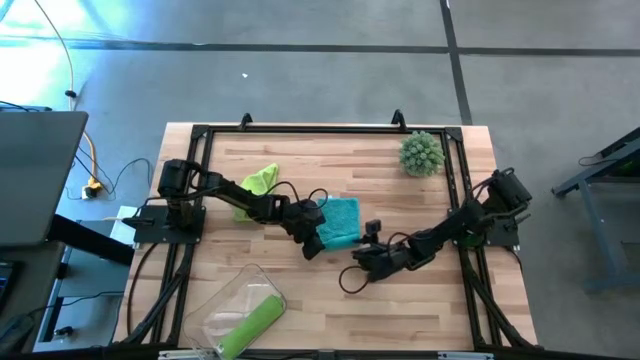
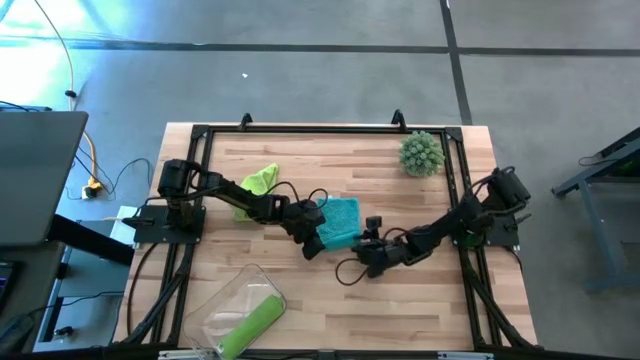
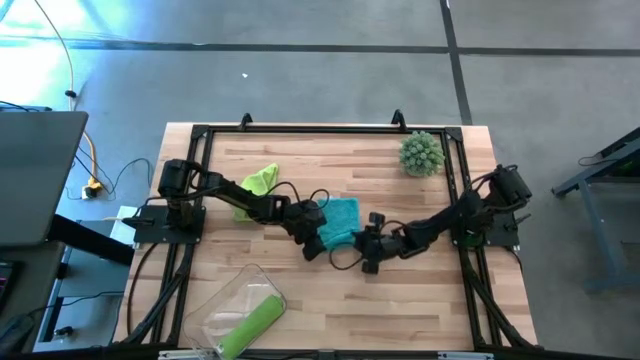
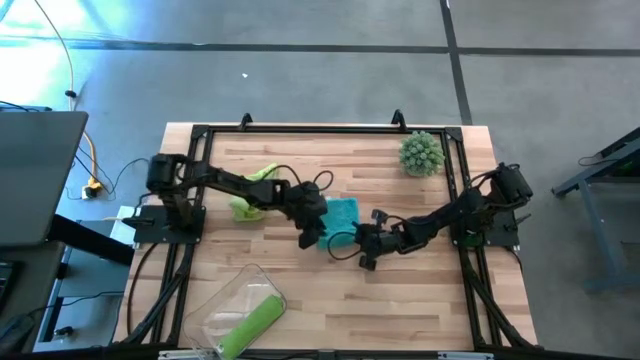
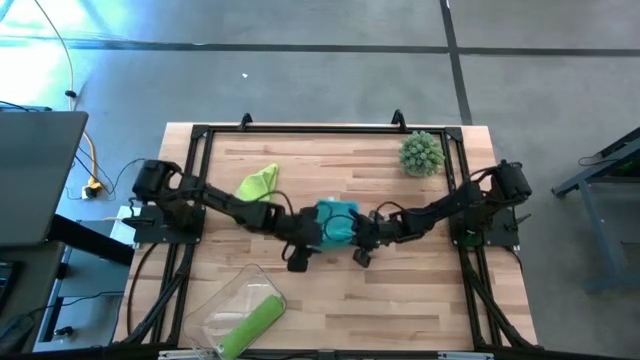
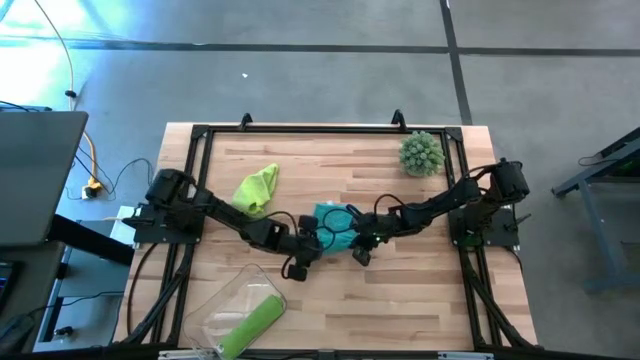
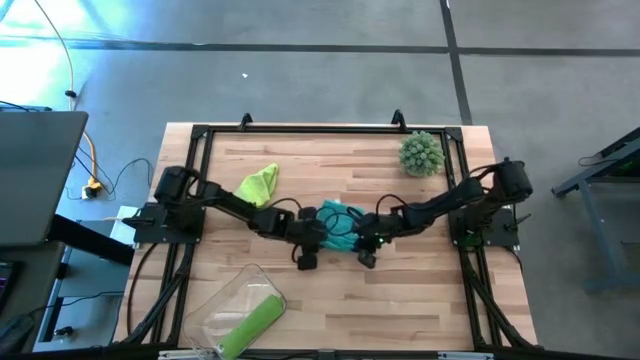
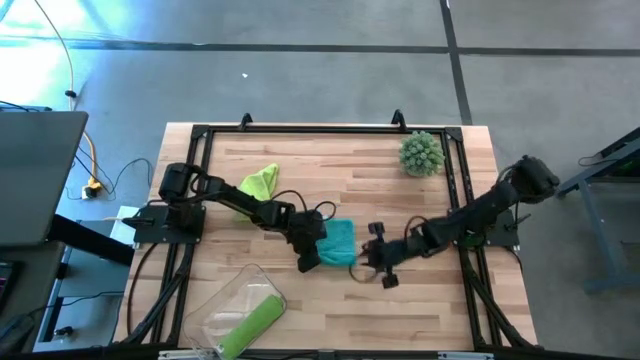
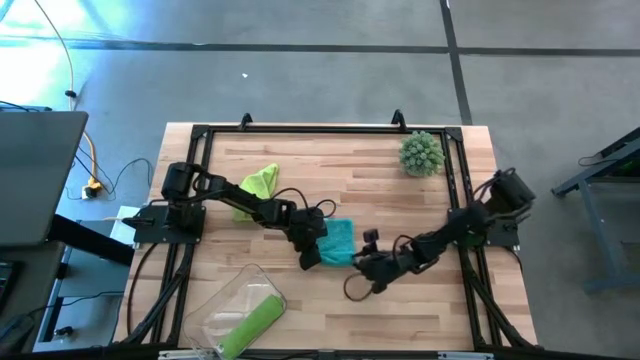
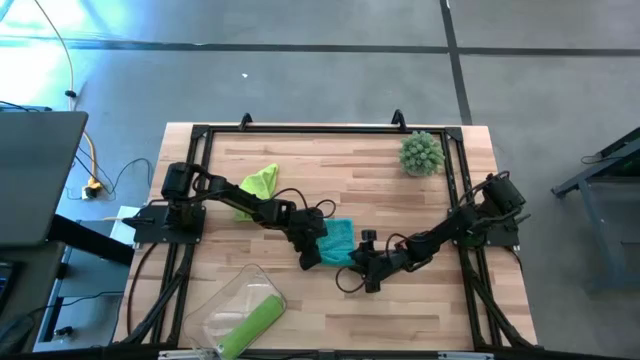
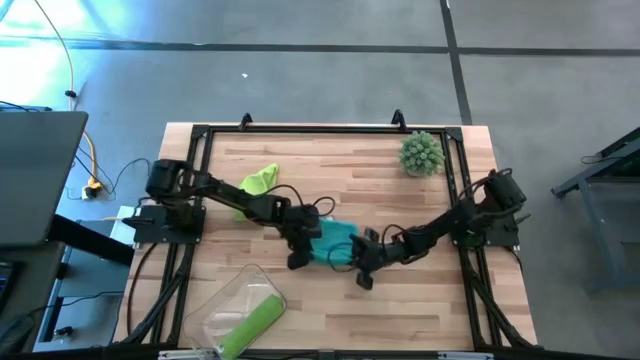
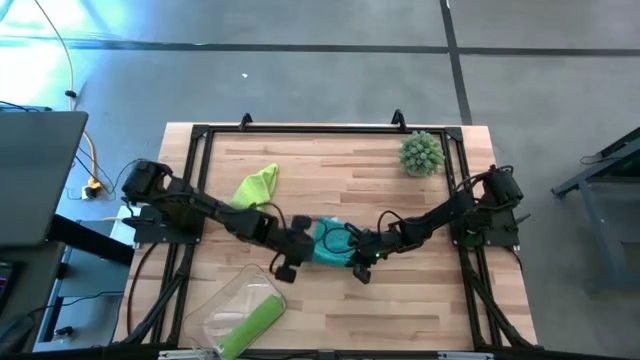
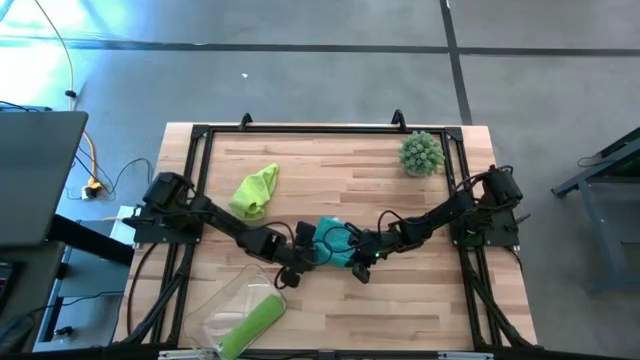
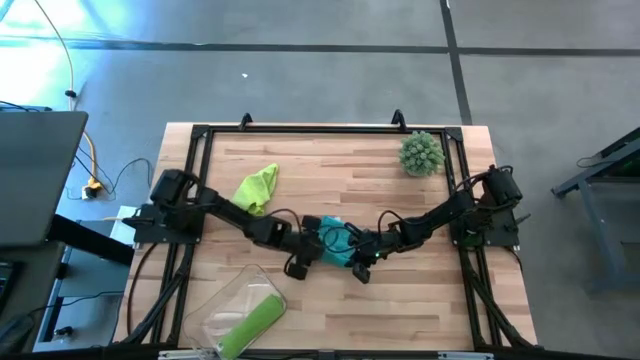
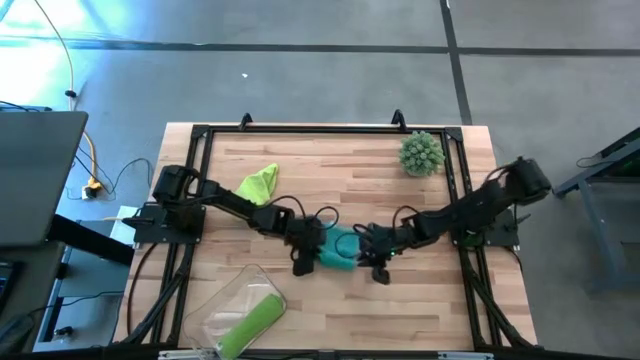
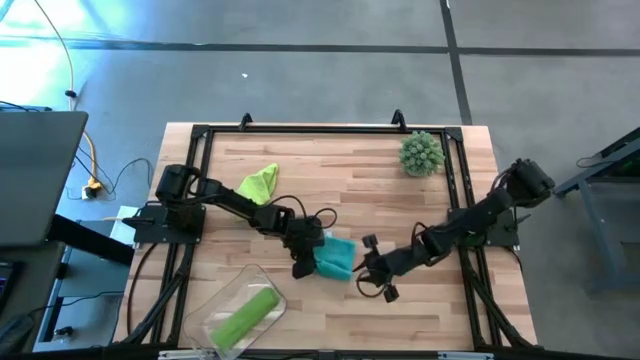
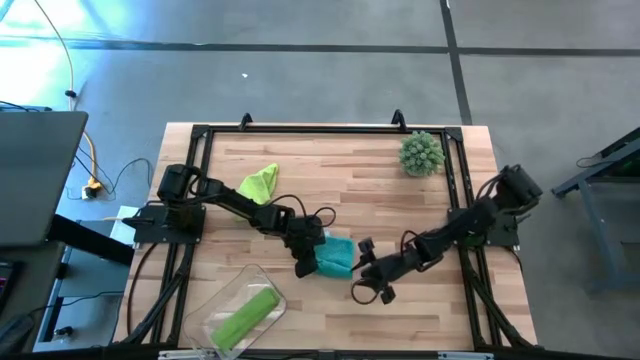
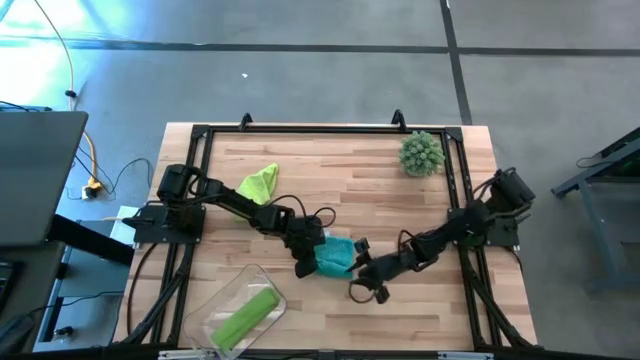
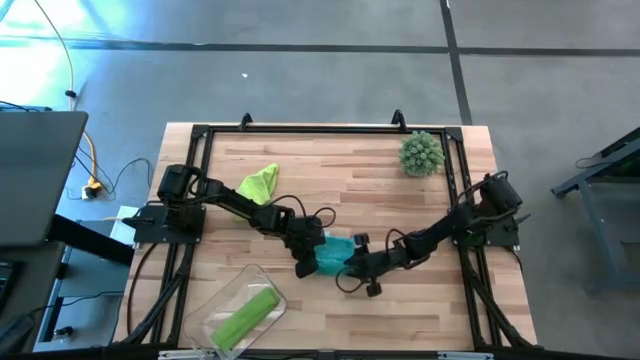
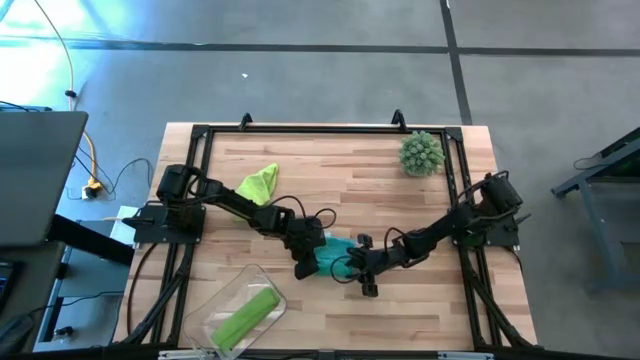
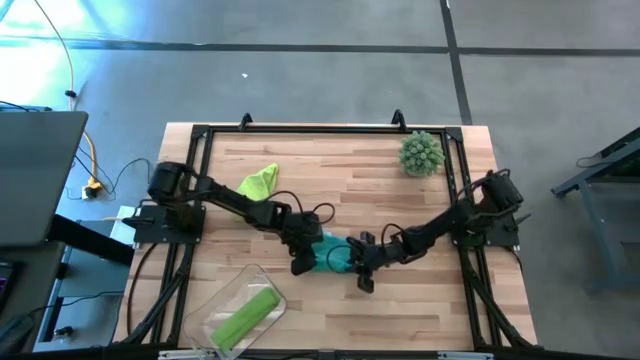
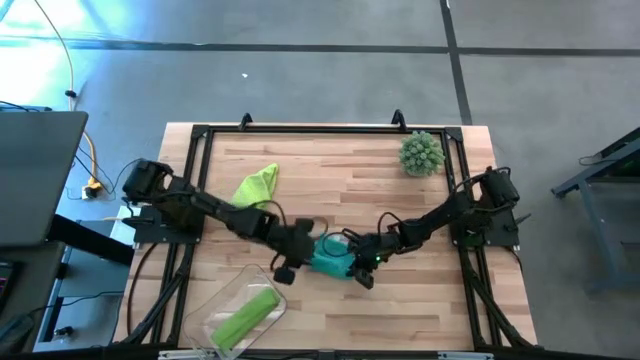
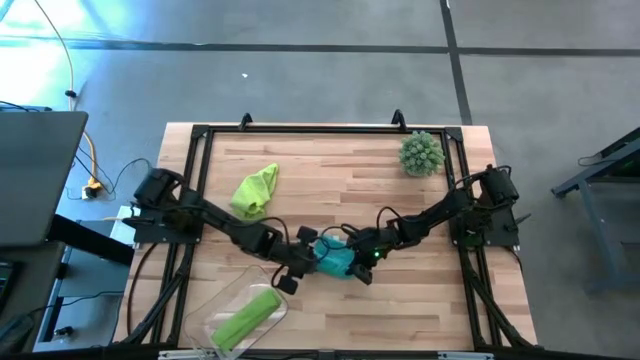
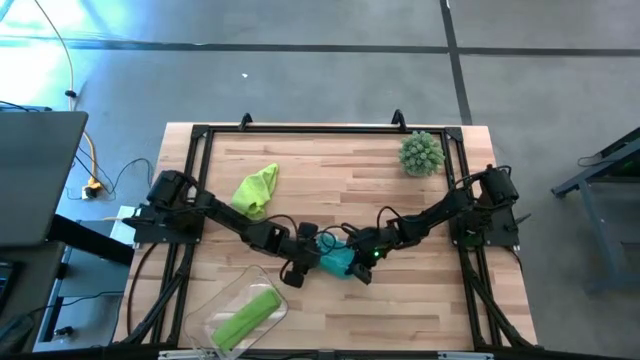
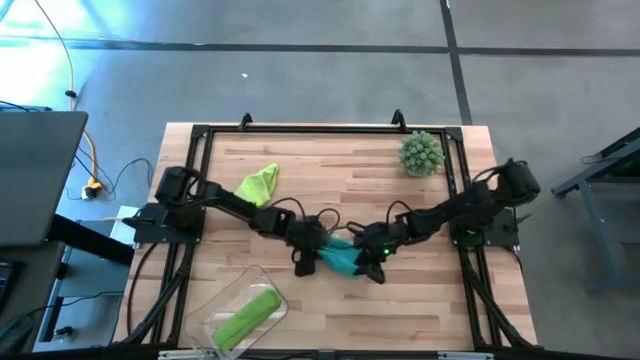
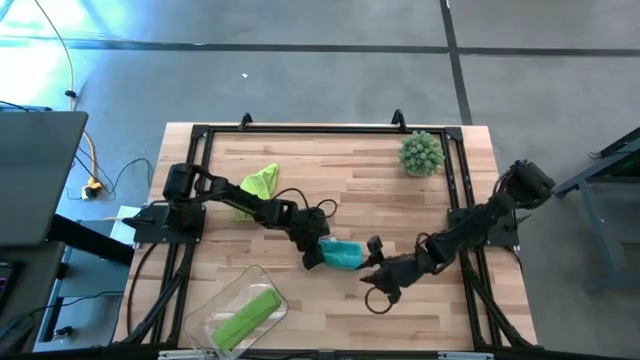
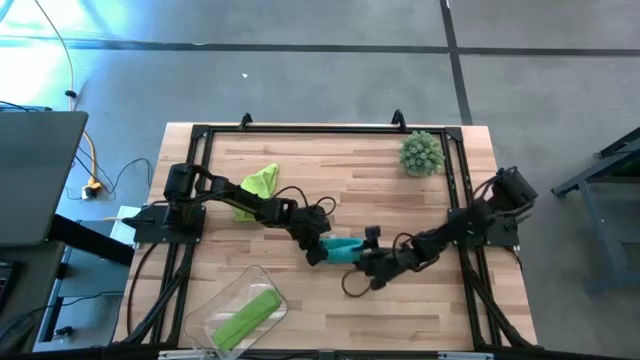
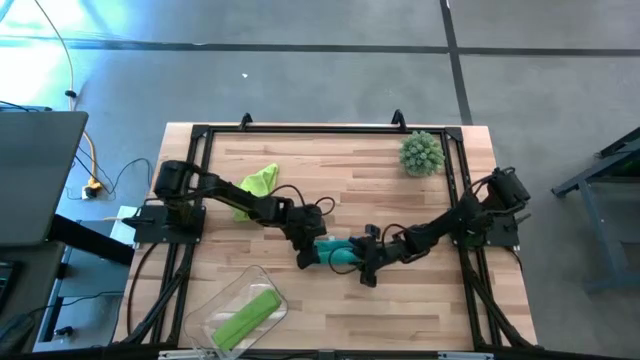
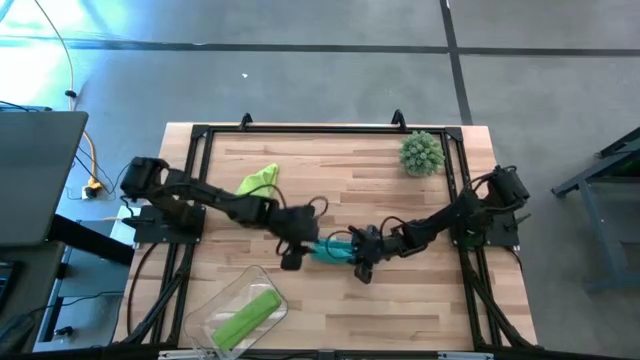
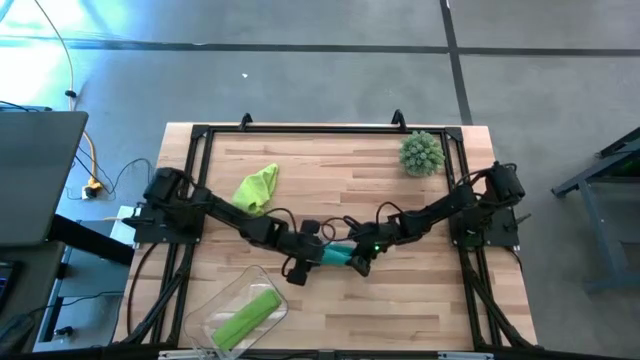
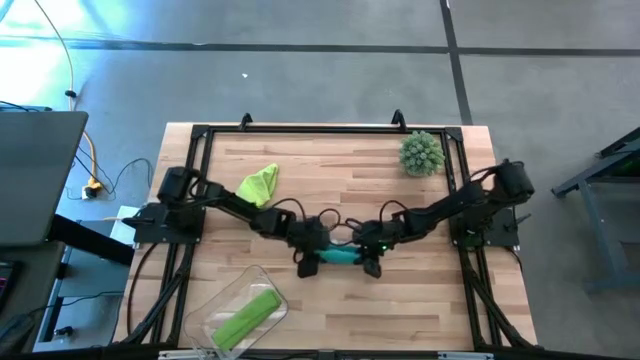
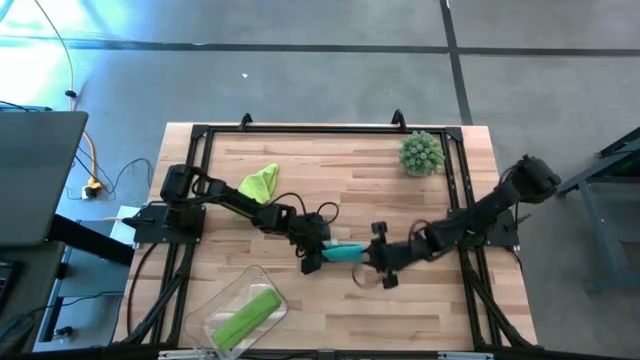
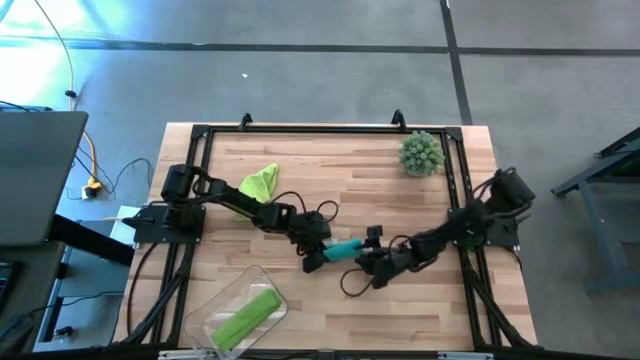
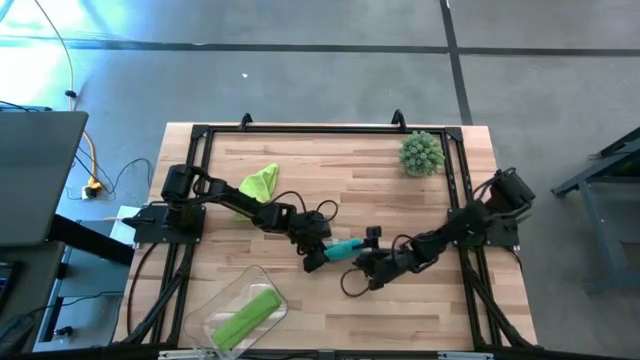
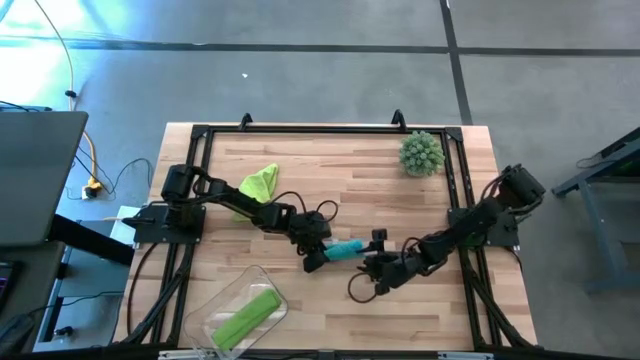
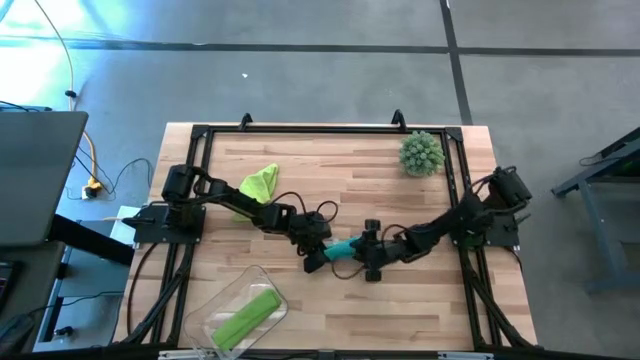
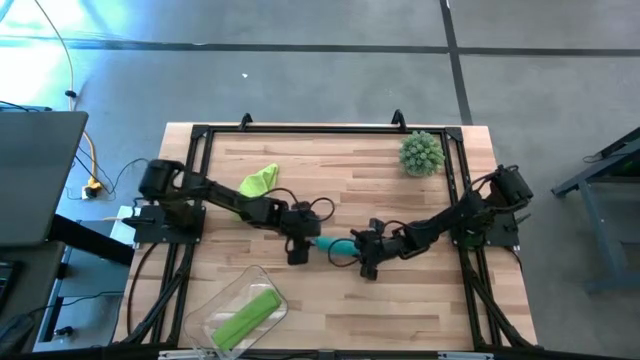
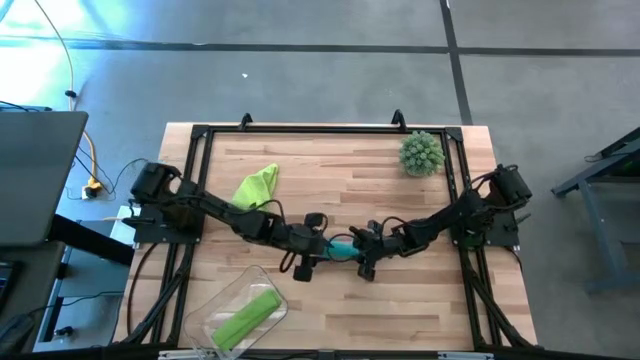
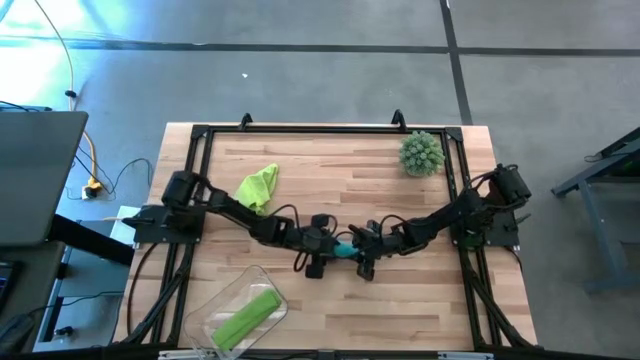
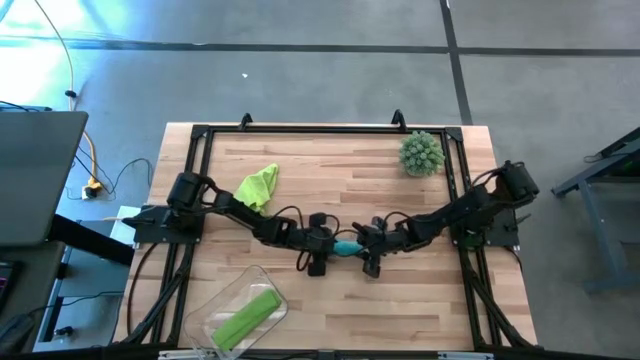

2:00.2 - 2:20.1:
Task: Roll microfiber towels into tight, uniform cylinder then place into a basket
Roll the blue microfiber cloth

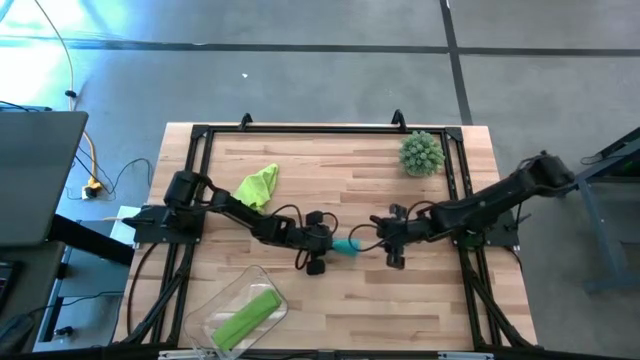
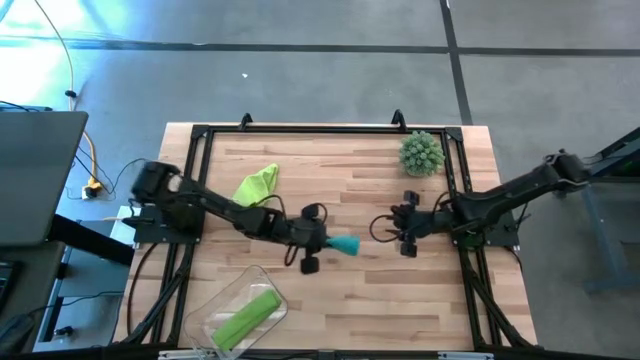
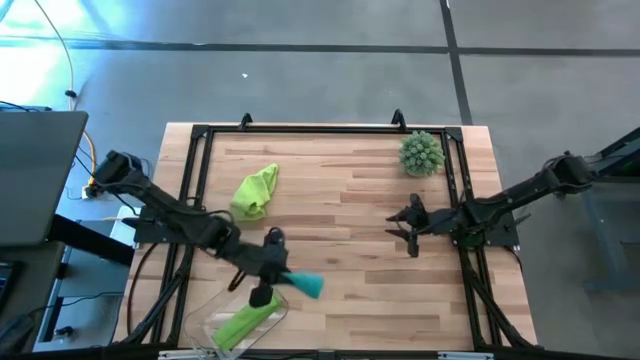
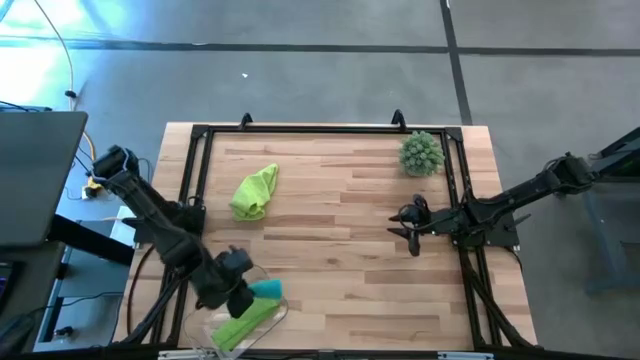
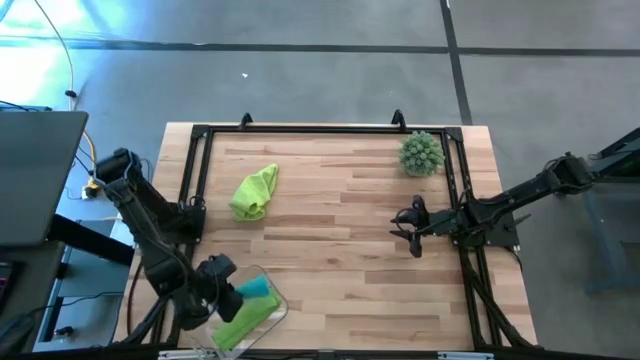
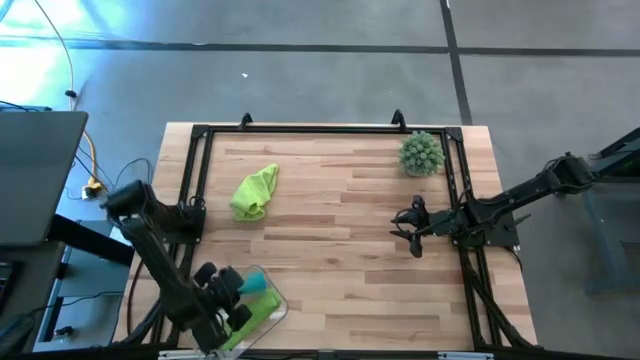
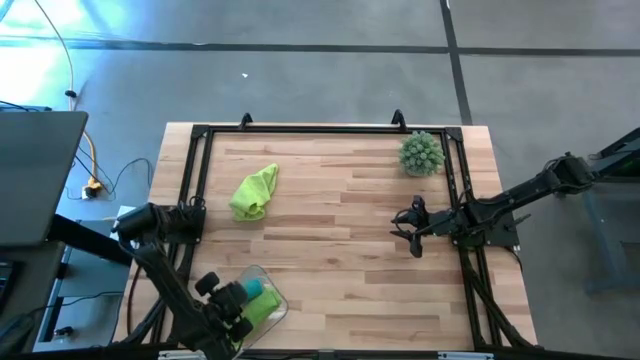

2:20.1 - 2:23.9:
Put the blue microfiber cloth into the transparent bin
